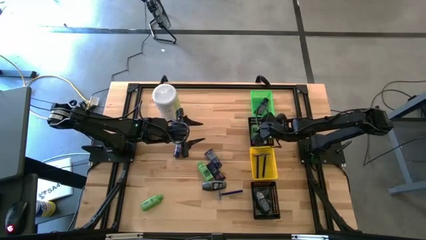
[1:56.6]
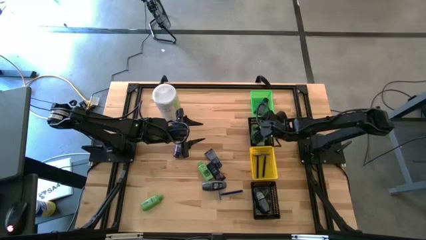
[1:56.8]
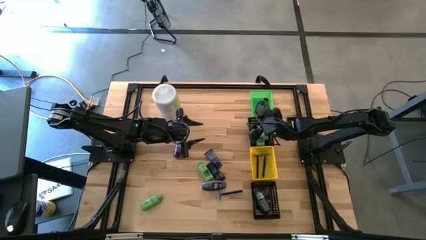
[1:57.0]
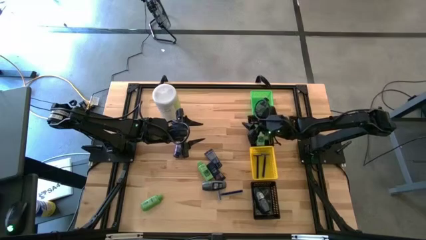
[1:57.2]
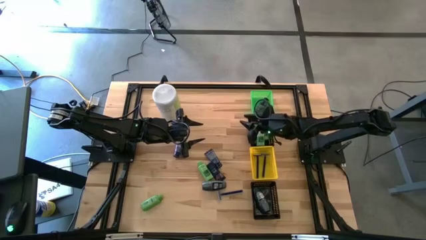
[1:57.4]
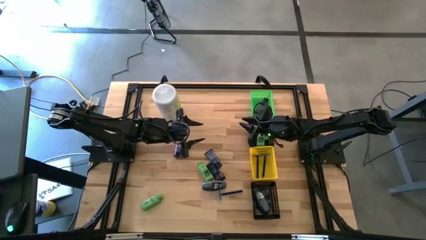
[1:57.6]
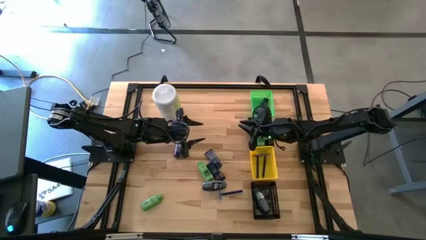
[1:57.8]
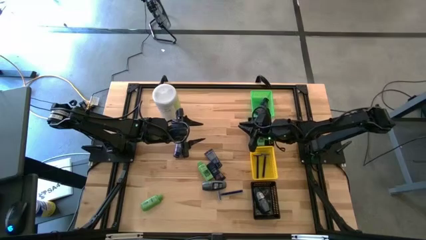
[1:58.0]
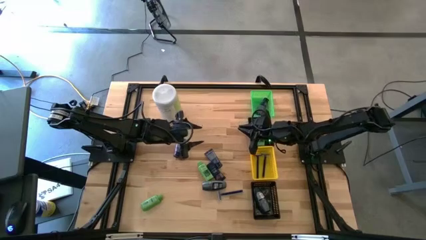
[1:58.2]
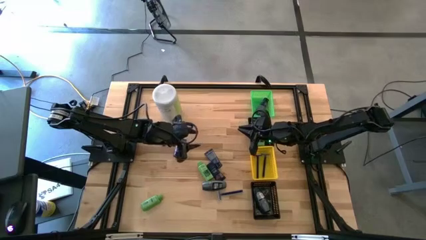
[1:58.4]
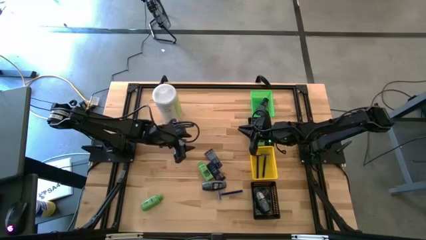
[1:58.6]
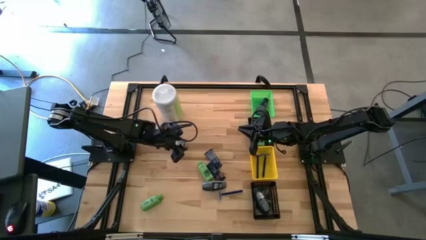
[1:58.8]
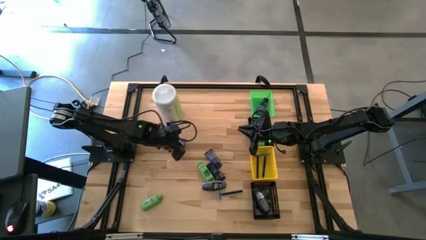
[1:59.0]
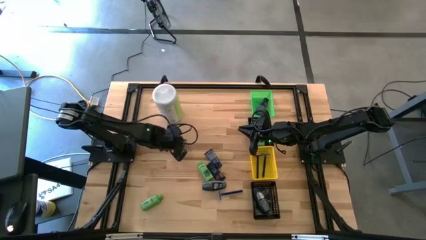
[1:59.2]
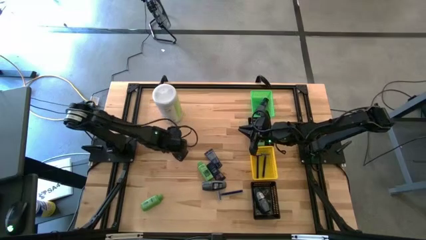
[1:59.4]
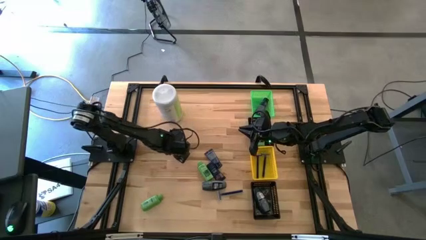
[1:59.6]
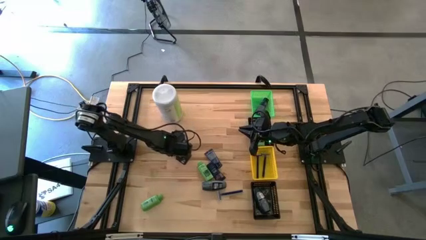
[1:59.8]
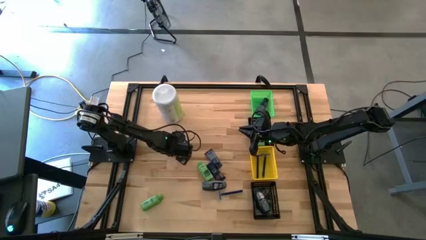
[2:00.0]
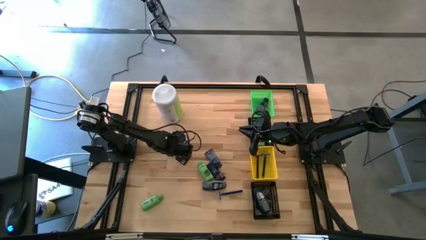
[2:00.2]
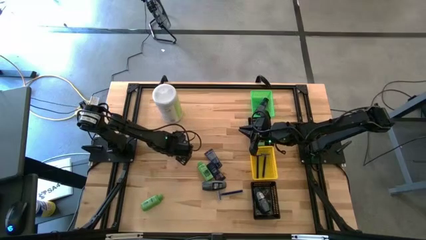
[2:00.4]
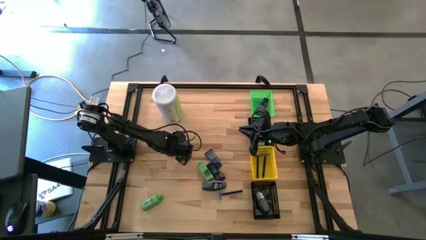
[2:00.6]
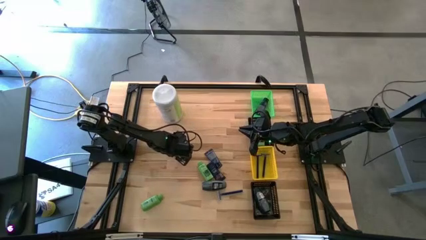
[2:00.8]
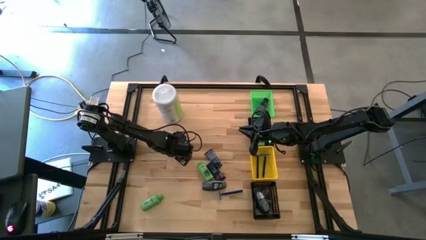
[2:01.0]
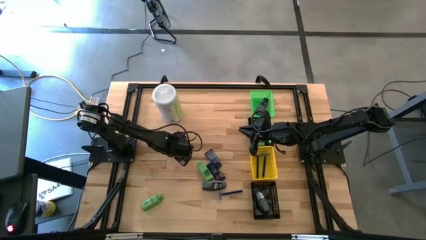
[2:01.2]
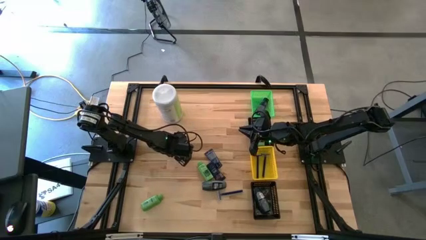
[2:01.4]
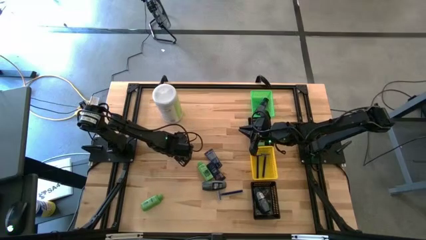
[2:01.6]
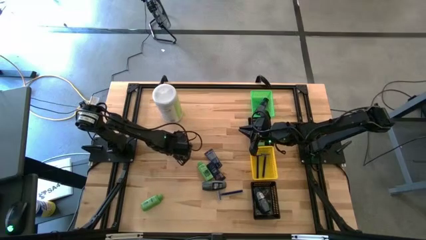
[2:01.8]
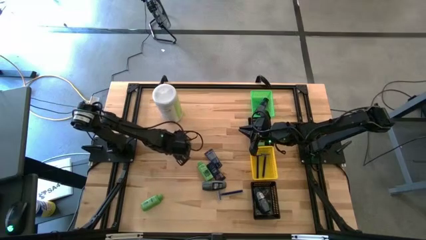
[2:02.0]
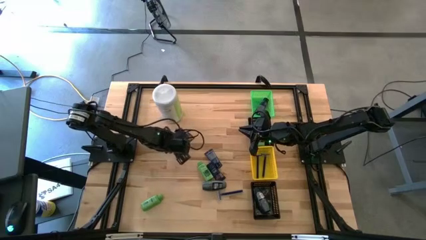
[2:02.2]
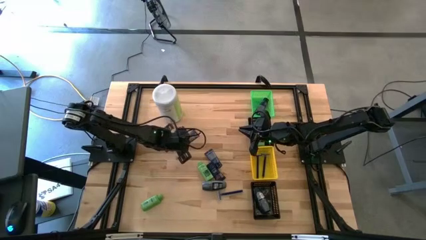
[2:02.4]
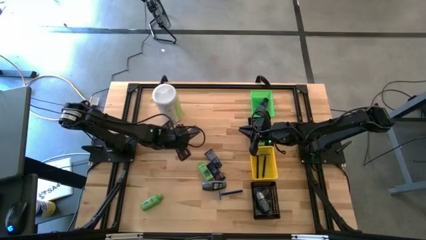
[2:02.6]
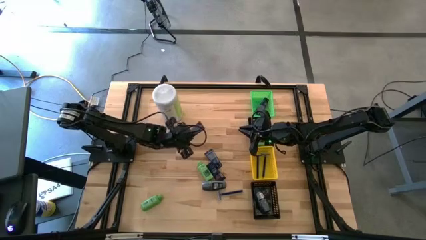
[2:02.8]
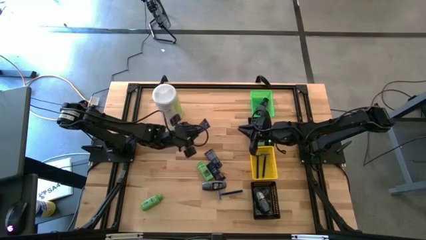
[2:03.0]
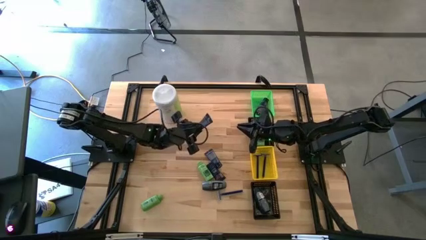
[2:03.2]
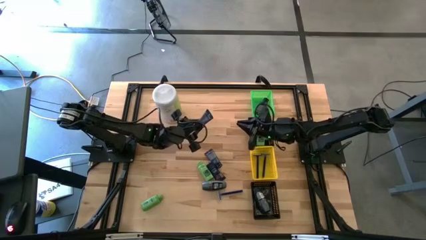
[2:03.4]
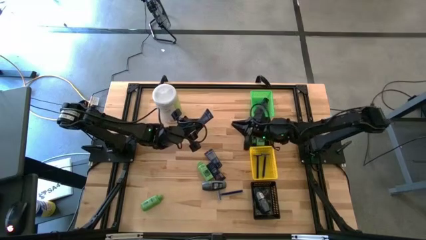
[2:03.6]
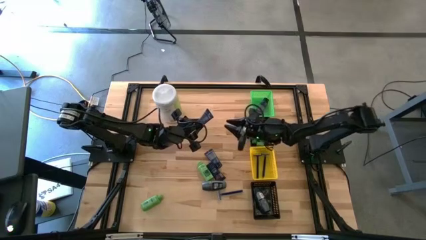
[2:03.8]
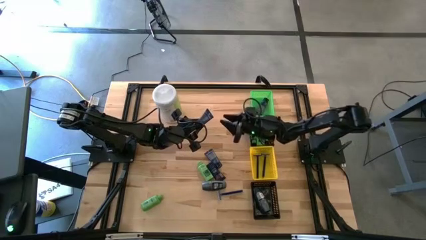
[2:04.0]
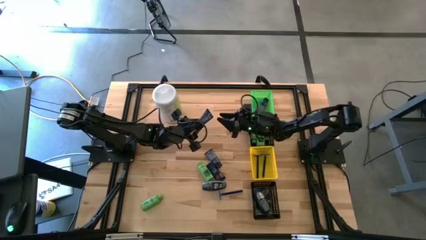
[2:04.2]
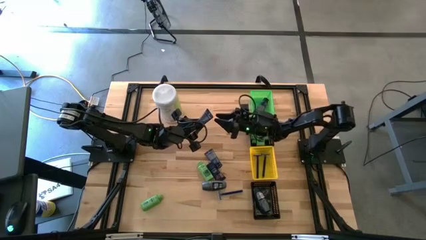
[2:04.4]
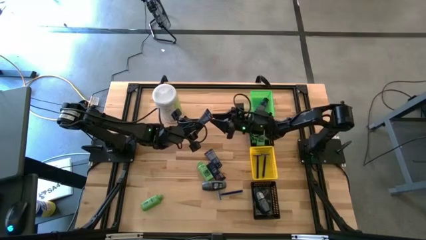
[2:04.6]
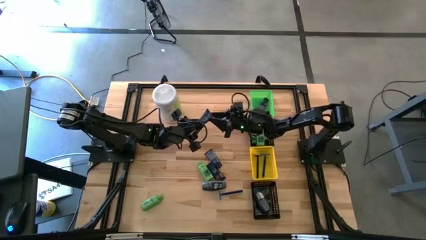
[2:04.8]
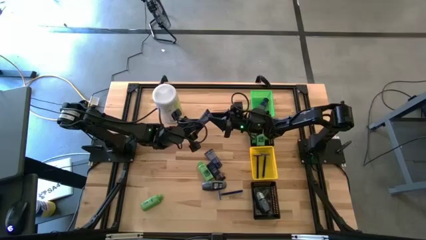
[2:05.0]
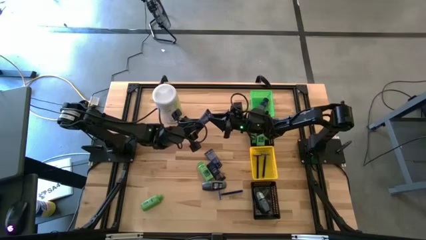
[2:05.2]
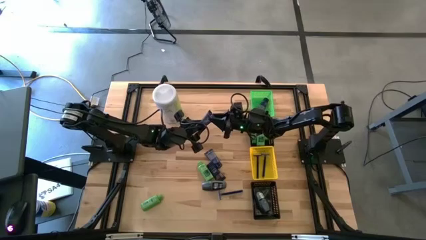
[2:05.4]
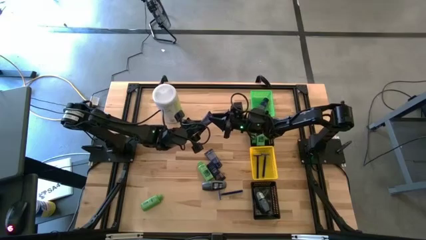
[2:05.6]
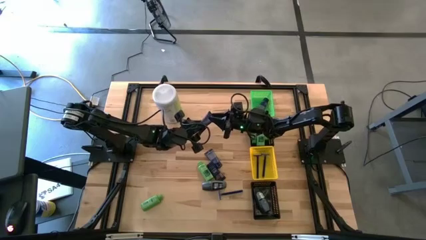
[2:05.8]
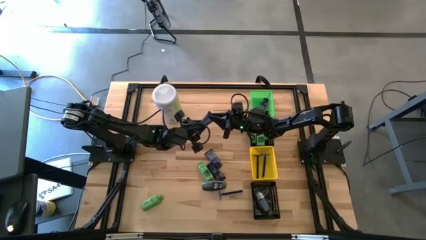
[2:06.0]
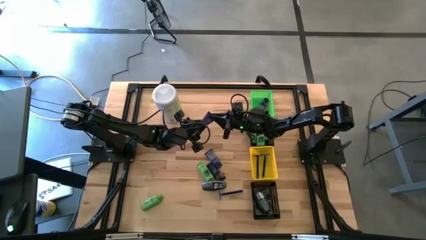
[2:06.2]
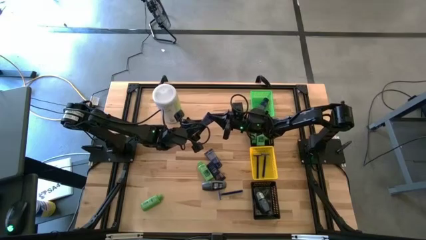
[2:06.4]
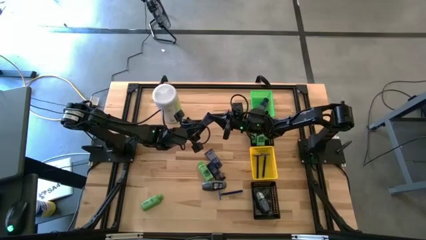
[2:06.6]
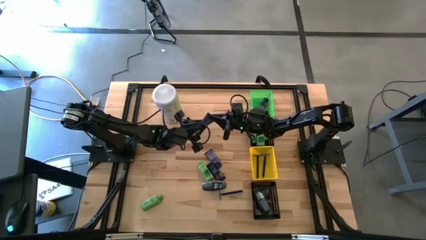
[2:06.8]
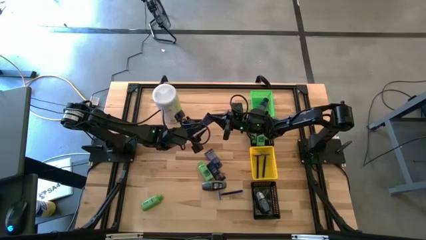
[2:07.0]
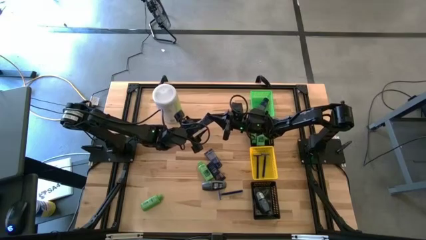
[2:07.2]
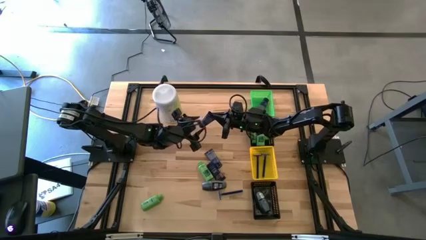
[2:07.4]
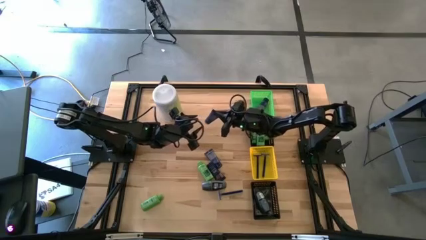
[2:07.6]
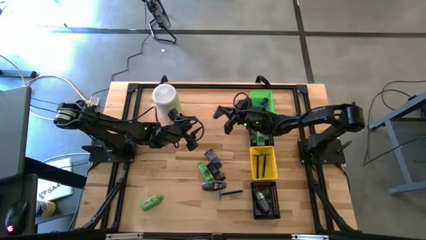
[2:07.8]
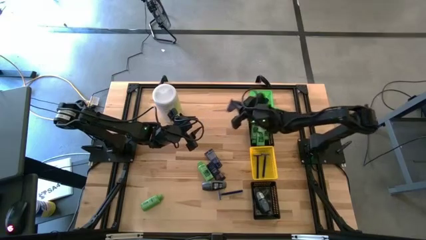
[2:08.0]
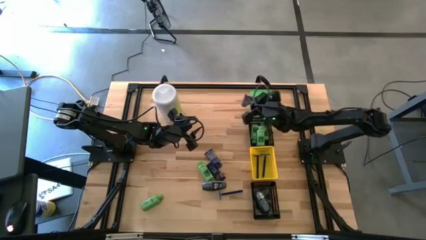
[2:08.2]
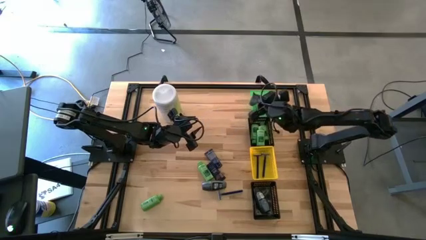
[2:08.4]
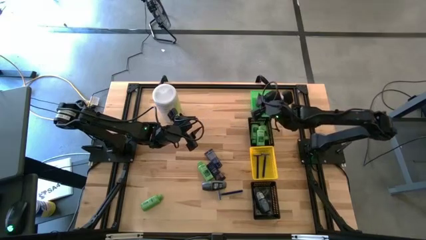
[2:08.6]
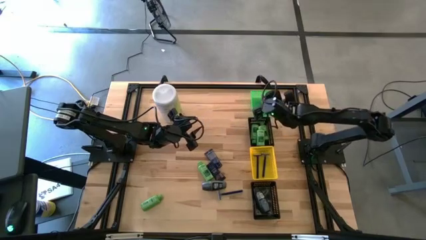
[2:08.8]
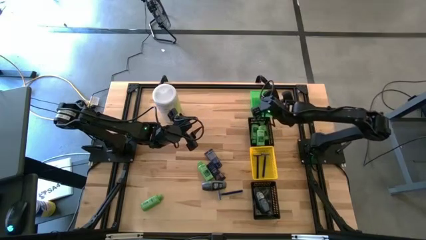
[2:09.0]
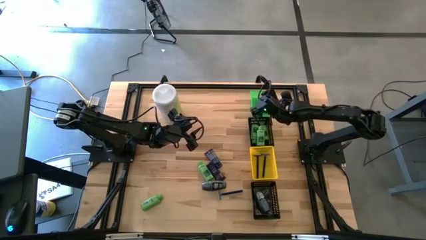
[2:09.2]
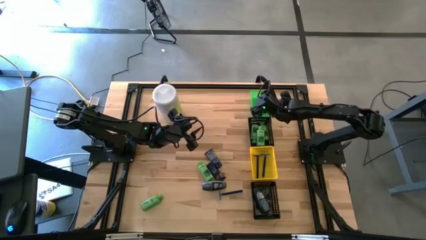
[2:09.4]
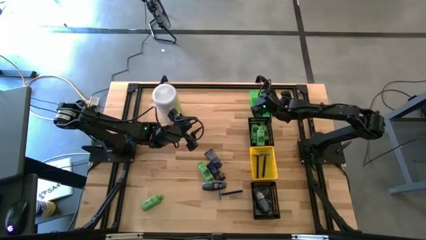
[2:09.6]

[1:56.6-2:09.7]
Task: Pick & Place Travel size toiletries
Put the blue shave cream into the green basket

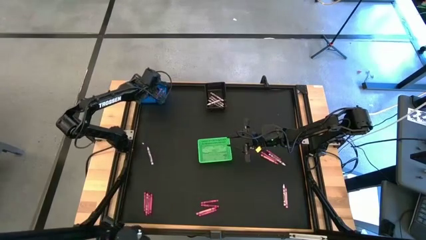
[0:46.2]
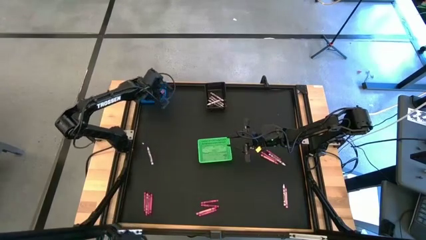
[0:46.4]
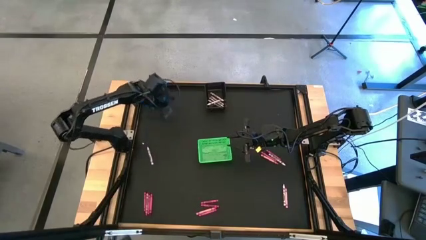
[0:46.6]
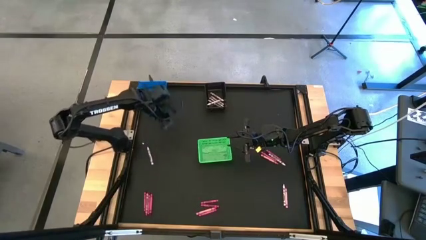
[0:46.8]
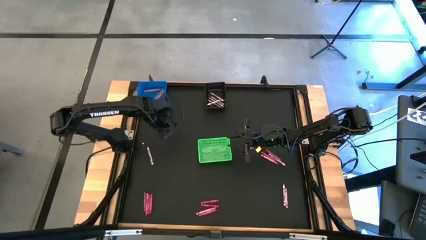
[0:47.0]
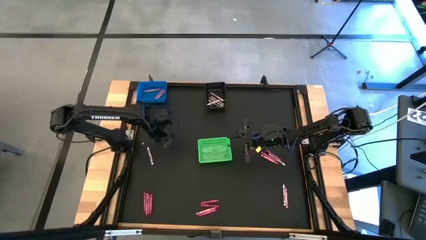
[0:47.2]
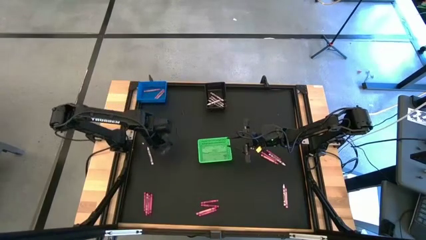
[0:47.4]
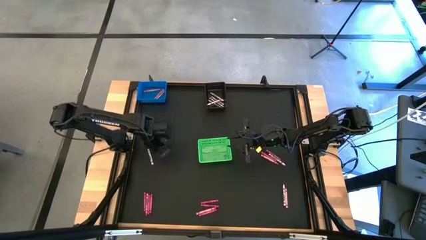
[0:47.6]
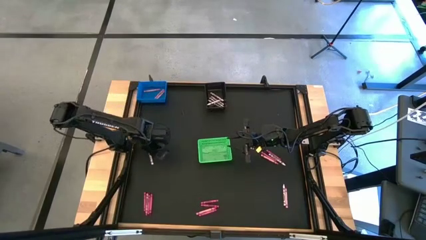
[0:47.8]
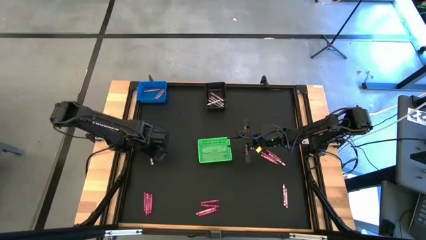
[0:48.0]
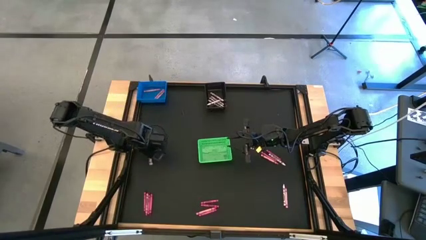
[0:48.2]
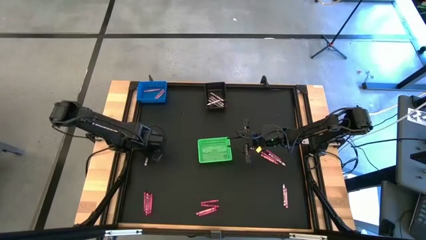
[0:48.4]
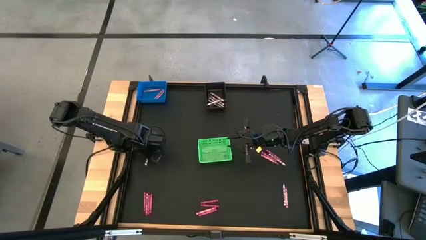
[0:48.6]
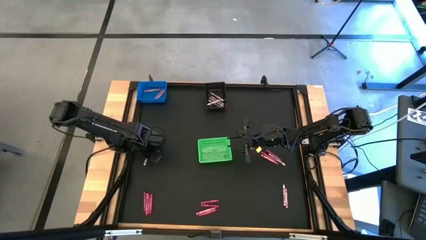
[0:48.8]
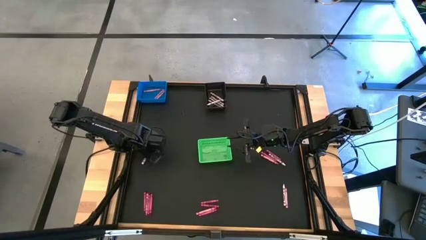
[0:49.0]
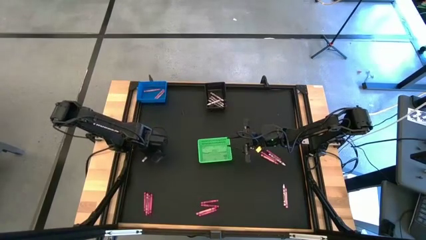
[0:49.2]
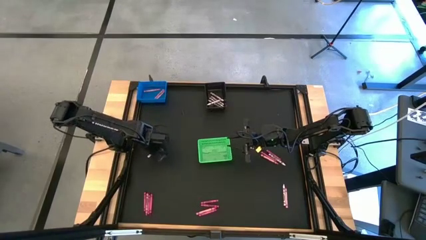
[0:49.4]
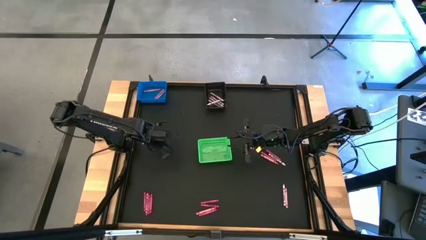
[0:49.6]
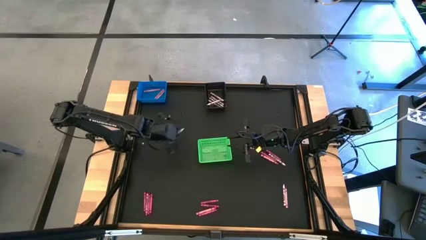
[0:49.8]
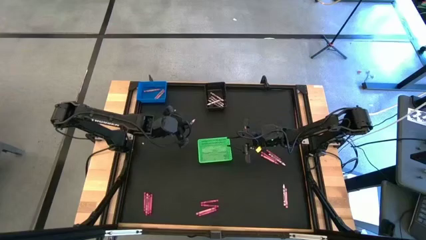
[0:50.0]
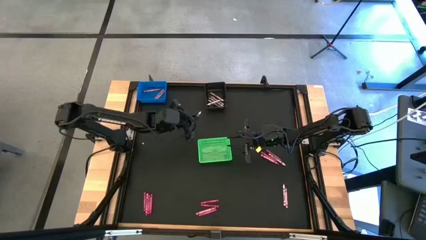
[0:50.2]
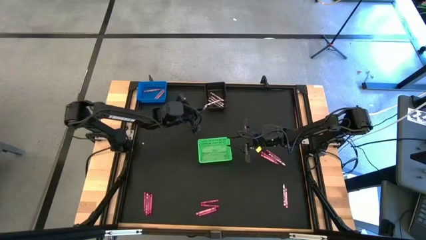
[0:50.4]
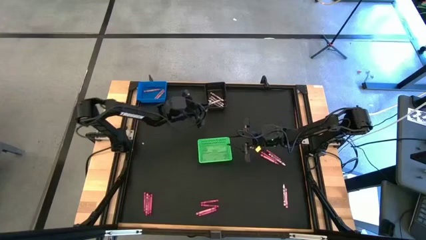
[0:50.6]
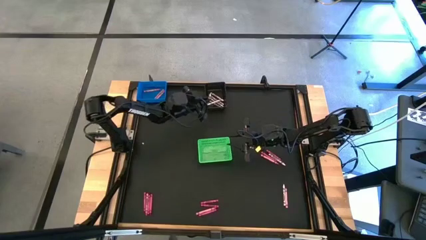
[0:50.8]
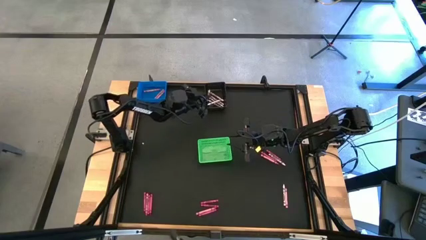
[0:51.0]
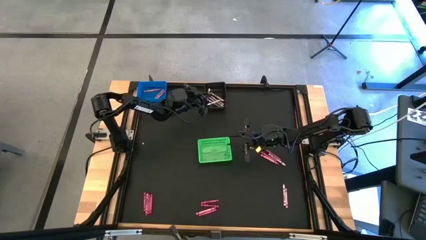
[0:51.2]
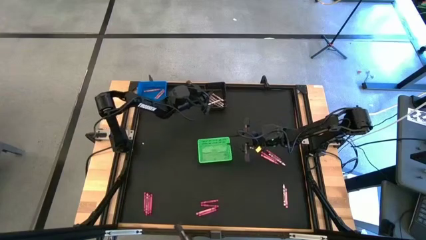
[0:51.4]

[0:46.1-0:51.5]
Task: Sort crayons
Put the white crayon into the black bin
